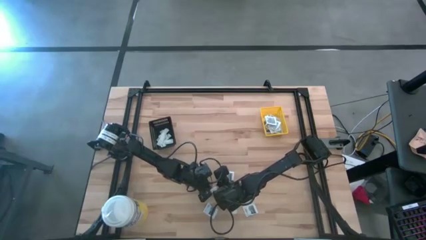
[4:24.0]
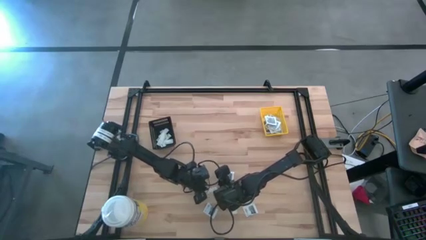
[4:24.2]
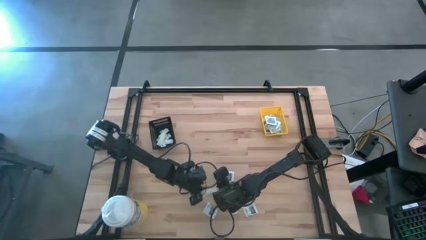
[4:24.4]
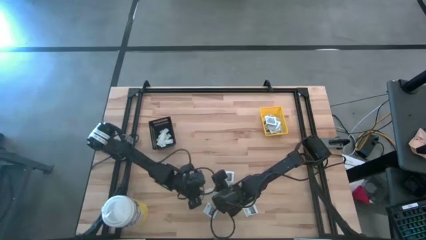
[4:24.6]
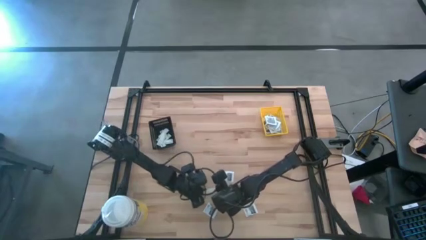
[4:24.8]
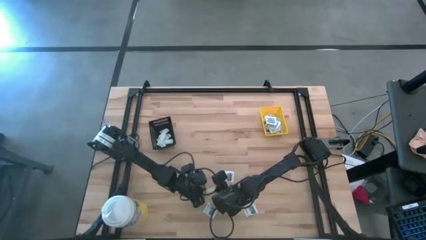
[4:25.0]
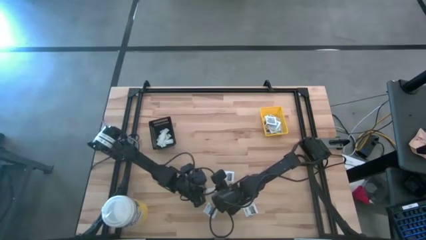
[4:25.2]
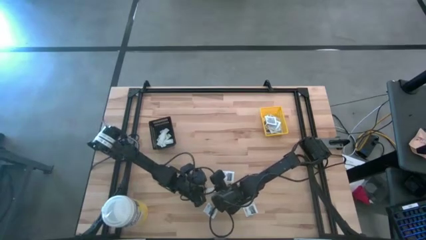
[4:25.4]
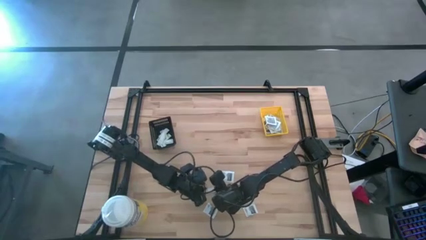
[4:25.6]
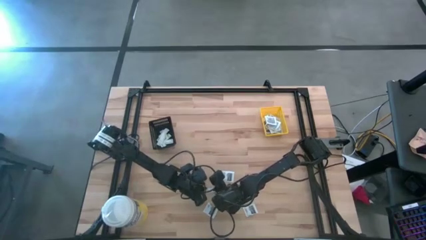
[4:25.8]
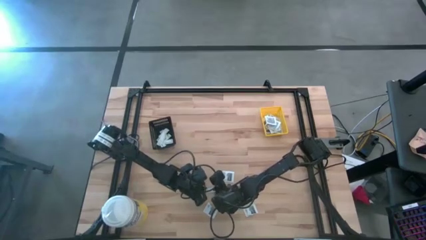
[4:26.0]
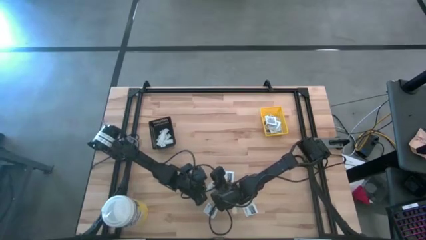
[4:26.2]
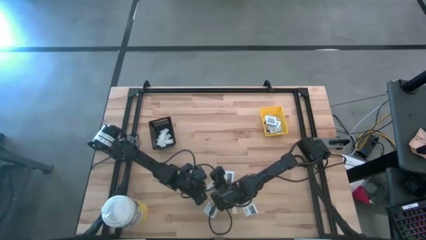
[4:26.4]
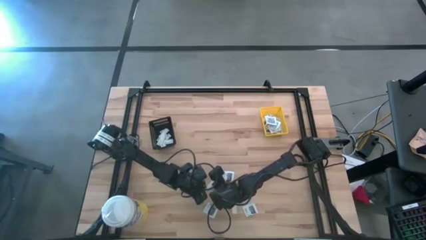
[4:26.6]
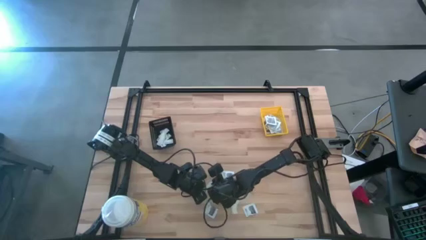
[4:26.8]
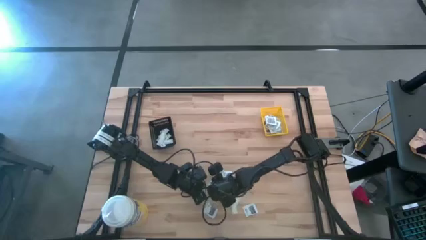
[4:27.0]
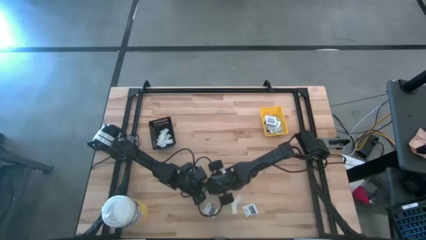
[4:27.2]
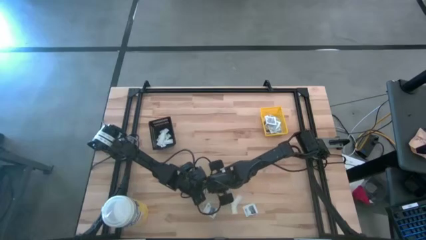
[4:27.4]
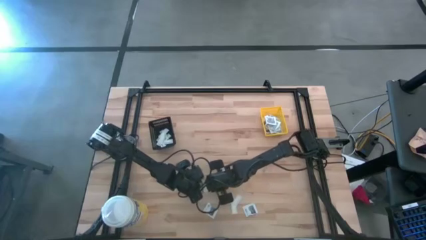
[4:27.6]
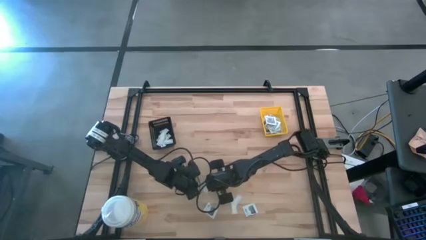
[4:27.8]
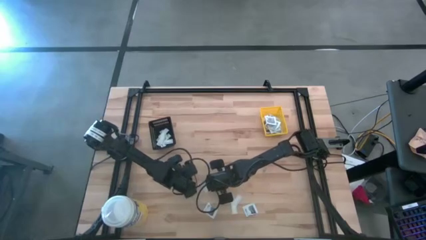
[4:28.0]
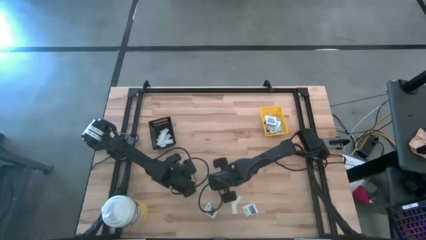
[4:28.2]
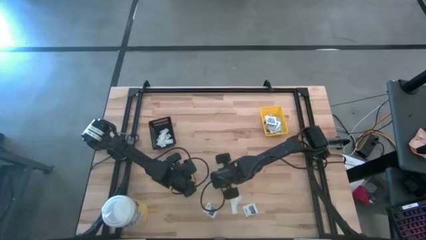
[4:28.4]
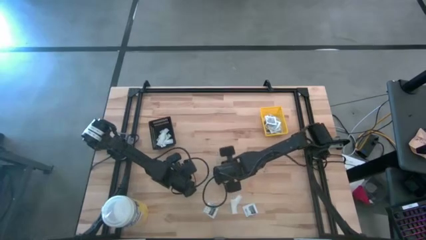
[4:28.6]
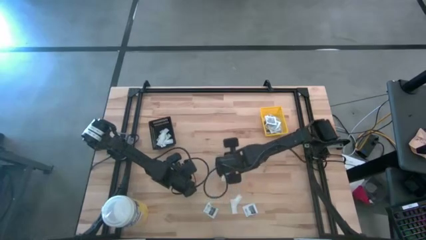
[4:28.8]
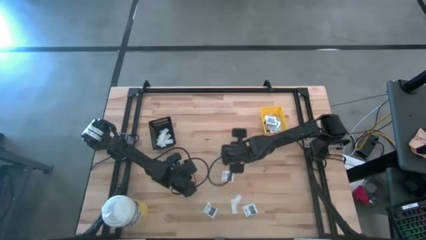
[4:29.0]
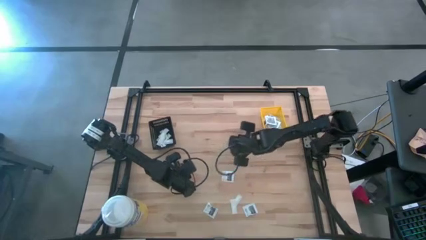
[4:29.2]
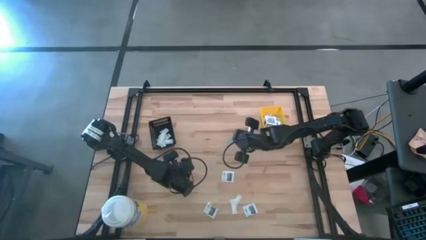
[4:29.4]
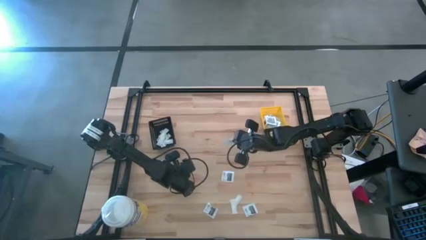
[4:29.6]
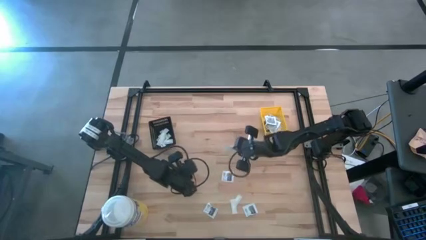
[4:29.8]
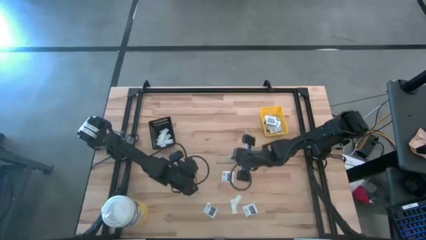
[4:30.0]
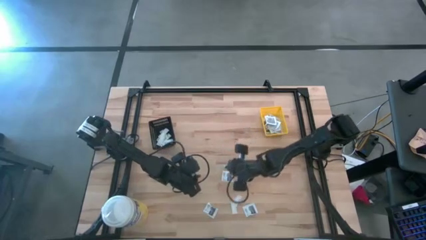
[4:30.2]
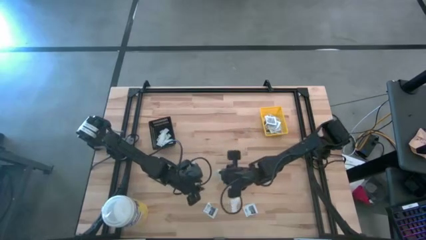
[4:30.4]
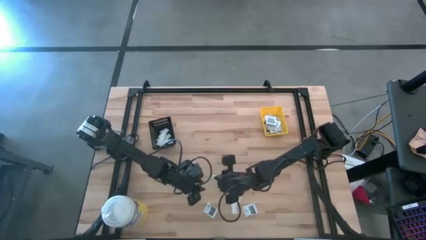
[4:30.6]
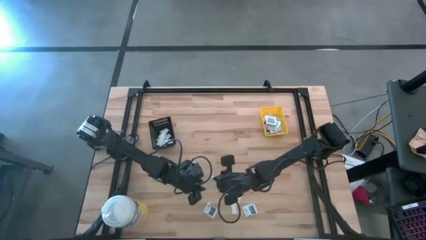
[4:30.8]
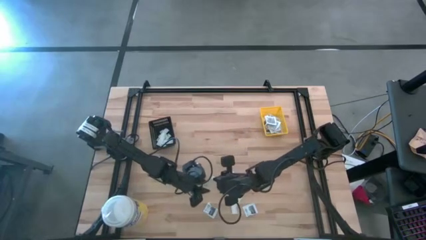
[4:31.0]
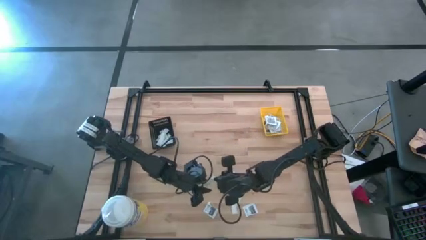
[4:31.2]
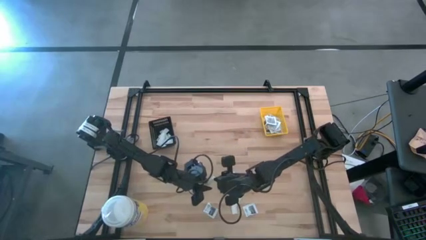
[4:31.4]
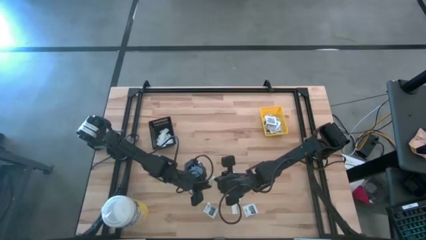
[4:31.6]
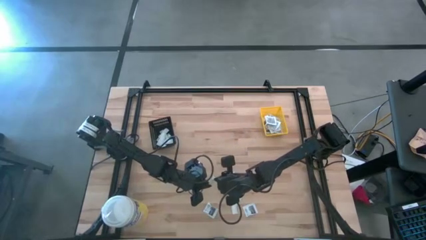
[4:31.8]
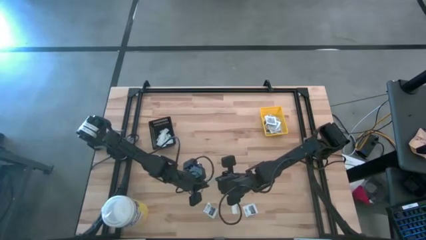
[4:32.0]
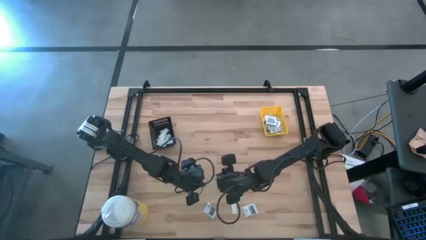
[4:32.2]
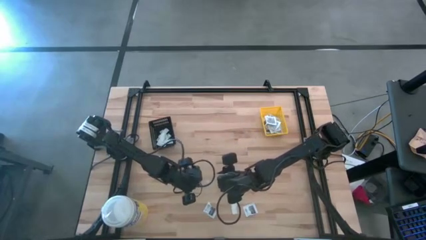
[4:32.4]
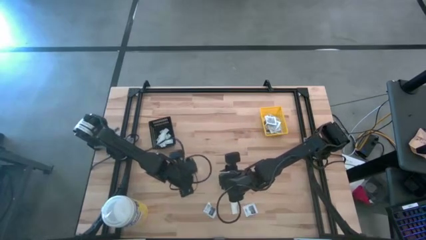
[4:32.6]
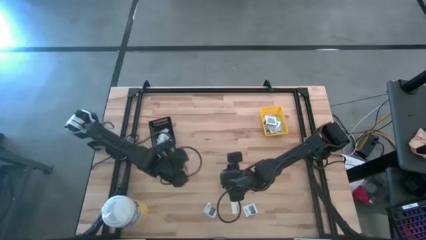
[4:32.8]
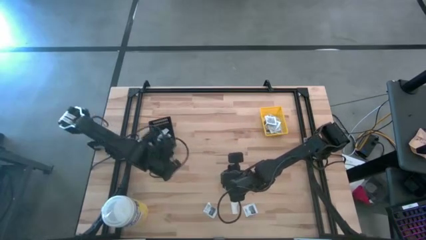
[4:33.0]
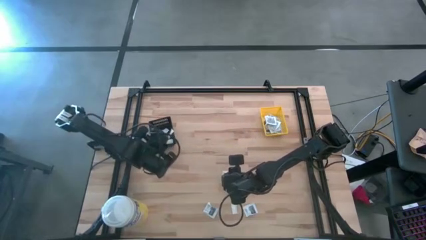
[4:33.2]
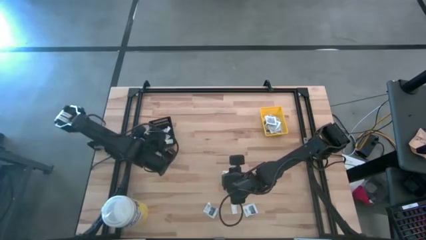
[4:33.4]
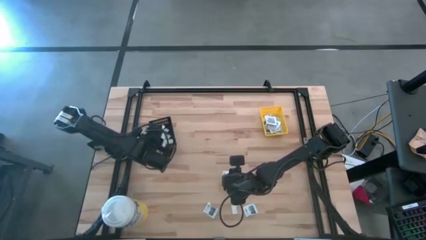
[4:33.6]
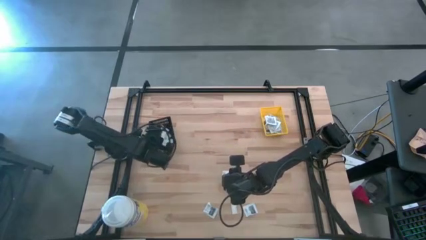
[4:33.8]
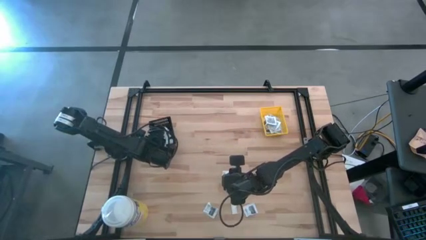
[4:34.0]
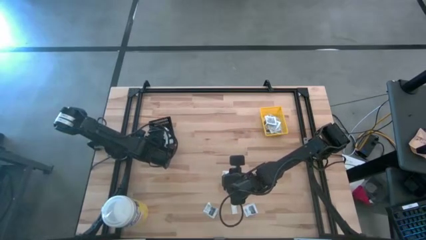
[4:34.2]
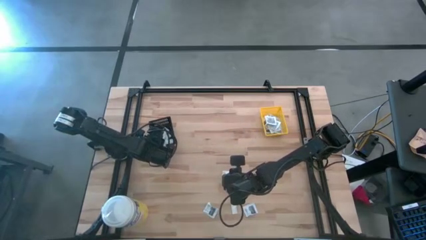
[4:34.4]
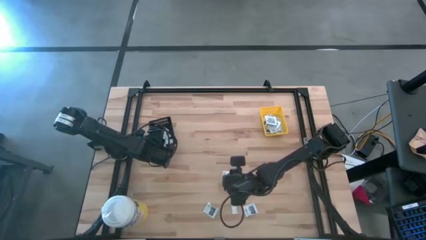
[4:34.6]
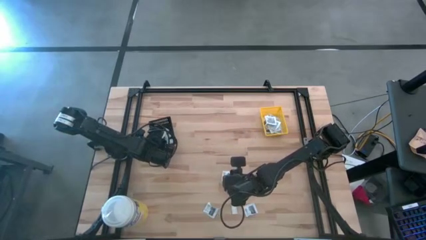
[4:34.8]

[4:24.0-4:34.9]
Task: Pick & Place First Aid Supplies
Put the green bandage into the black bin

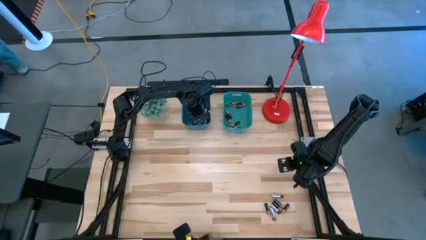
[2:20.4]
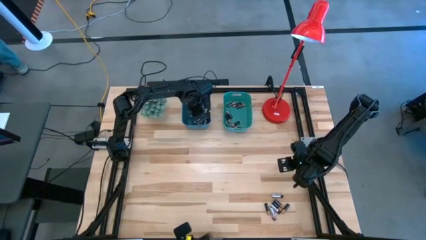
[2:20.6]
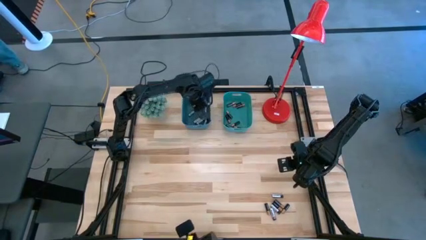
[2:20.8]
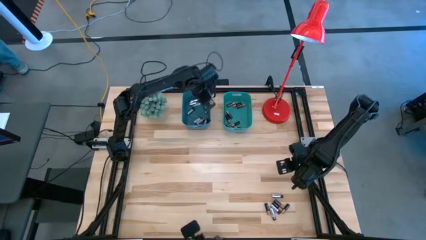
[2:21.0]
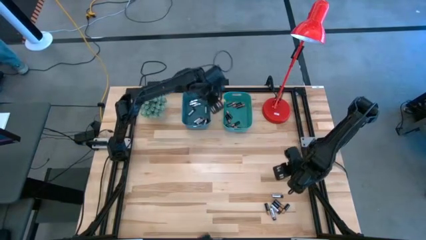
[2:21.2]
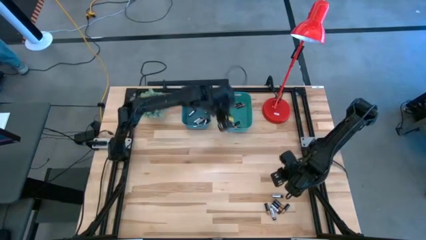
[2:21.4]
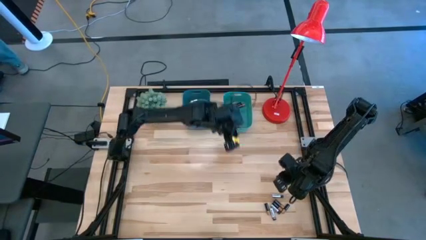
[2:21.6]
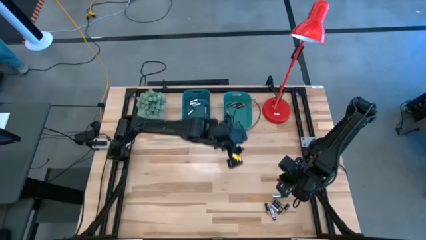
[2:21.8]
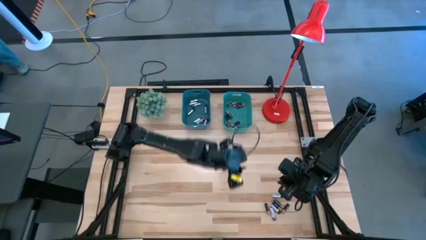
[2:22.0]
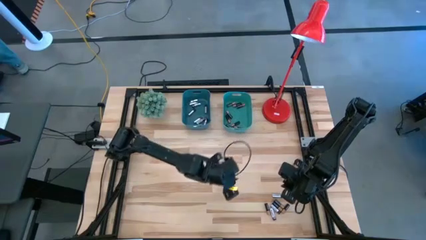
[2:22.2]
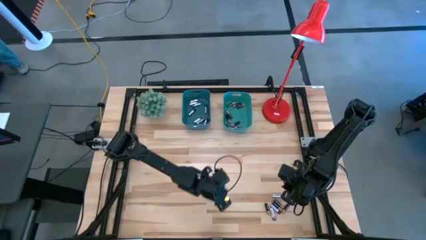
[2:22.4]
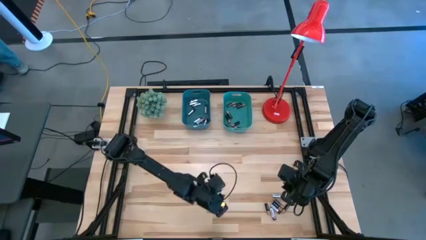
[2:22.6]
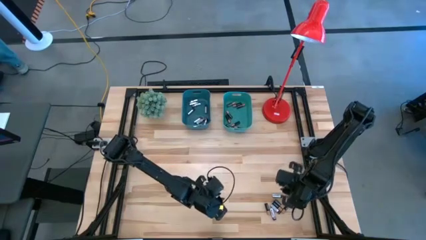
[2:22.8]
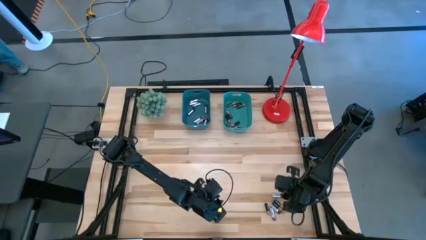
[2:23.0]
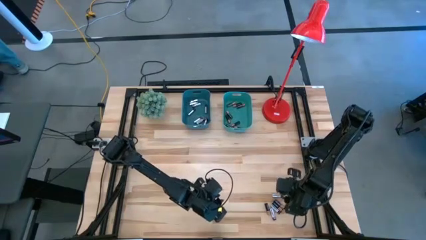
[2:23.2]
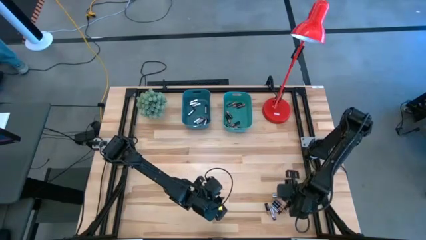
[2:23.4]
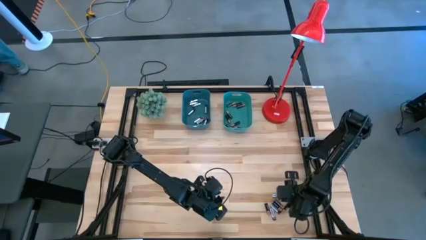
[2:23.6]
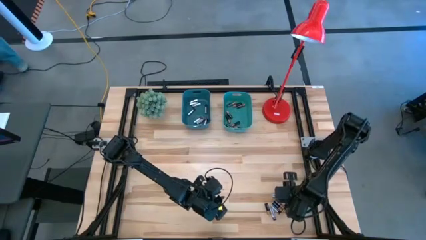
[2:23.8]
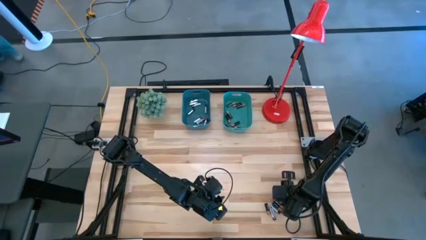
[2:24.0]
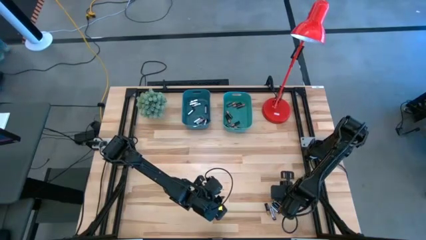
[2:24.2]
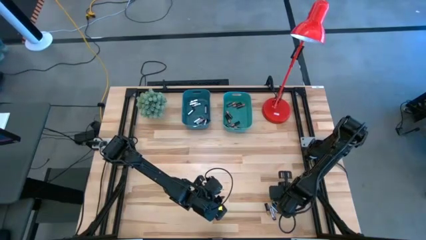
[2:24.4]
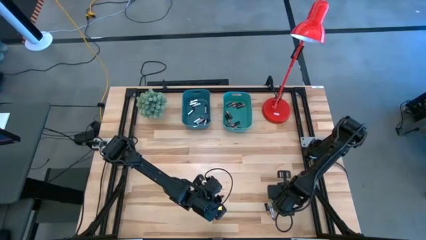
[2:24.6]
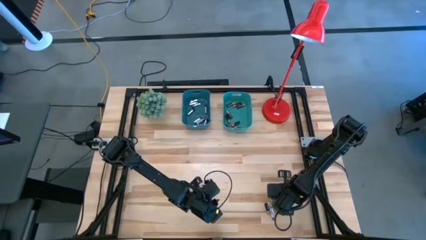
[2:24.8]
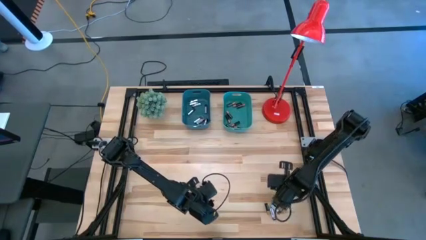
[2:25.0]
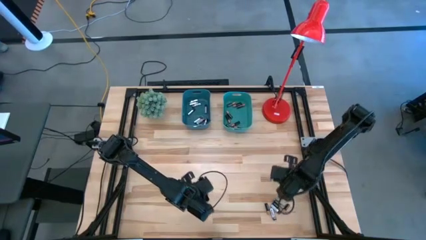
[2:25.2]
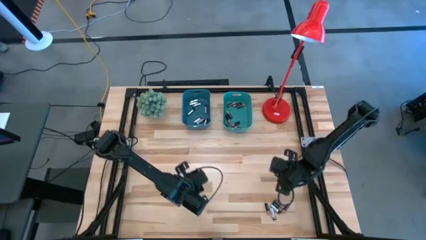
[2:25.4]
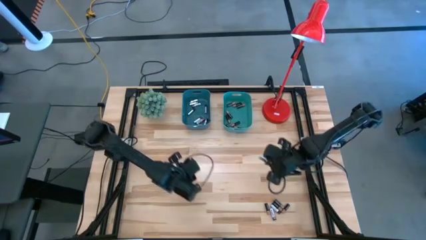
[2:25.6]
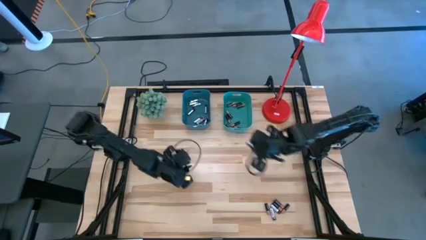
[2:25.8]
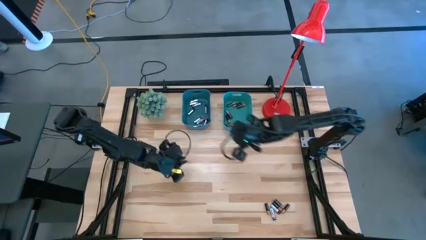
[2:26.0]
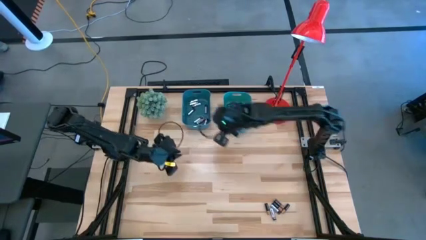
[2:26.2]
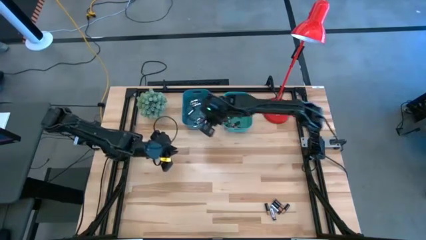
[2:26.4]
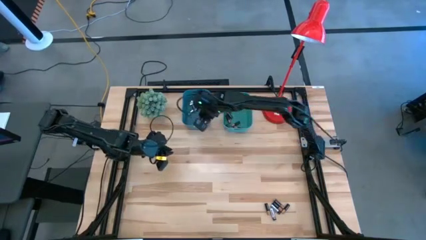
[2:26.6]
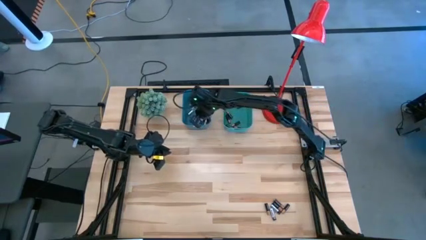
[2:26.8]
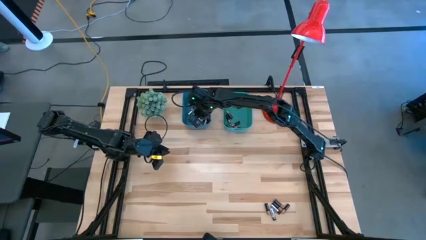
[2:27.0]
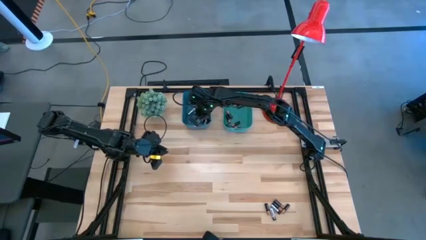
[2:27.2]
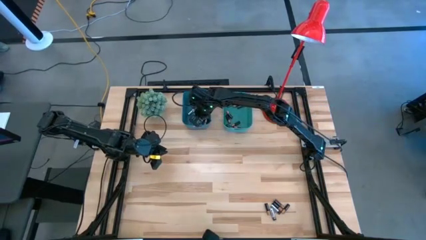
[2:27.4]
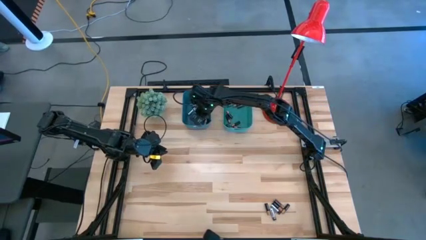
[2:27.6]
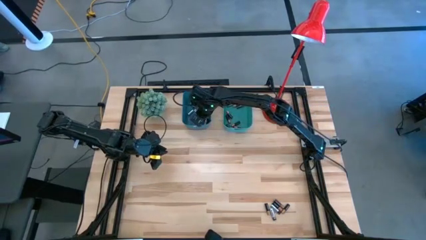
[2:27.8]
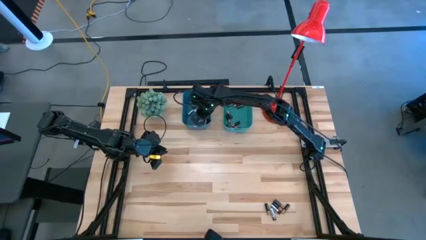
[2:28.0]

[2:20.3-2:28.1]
Task: Sort batteries
Put the silver battery into the blue bin
